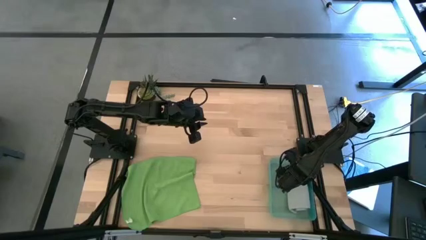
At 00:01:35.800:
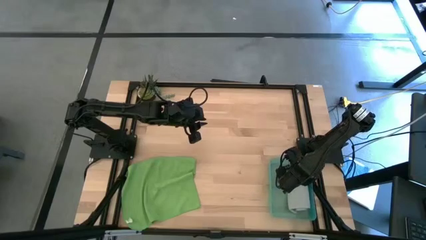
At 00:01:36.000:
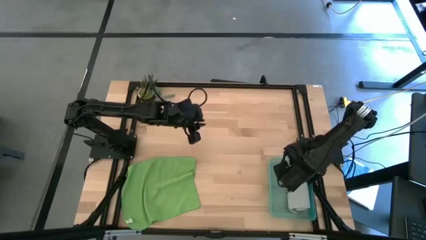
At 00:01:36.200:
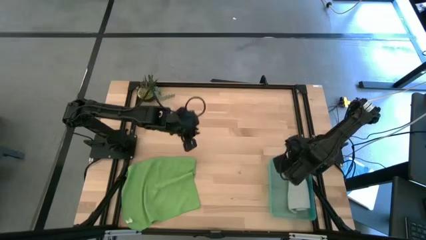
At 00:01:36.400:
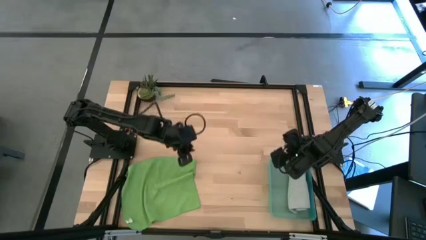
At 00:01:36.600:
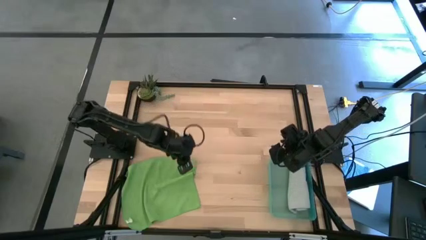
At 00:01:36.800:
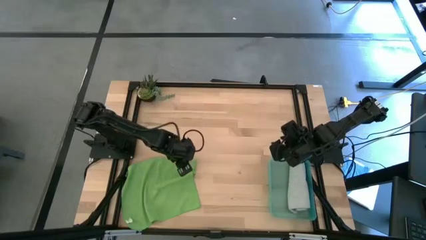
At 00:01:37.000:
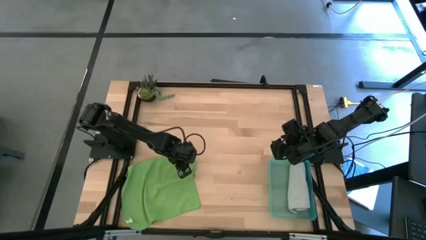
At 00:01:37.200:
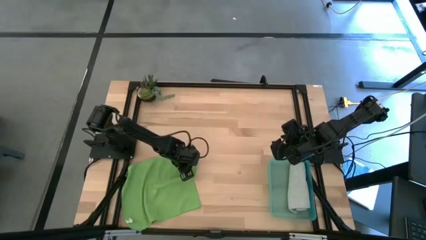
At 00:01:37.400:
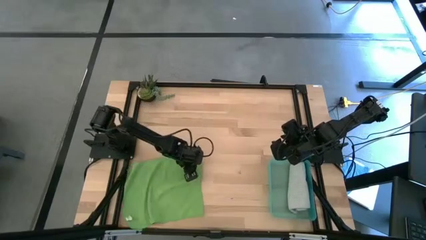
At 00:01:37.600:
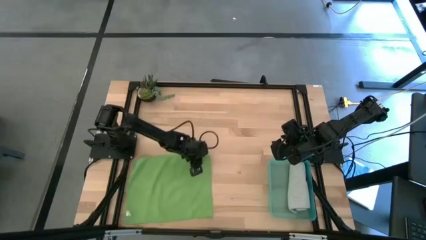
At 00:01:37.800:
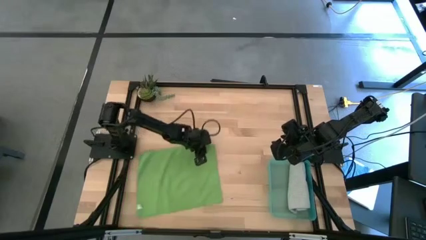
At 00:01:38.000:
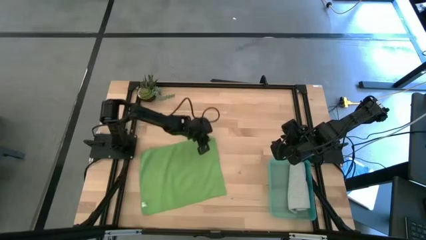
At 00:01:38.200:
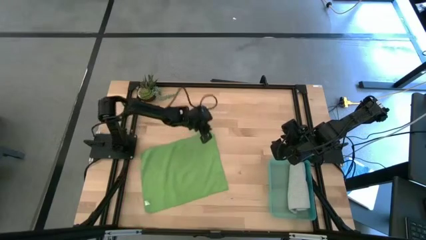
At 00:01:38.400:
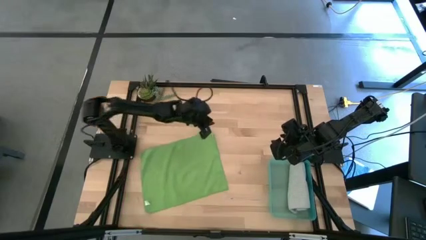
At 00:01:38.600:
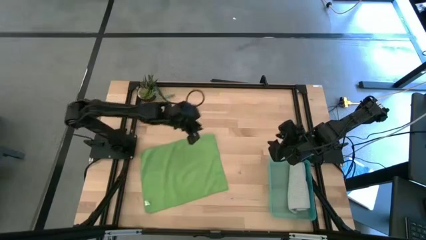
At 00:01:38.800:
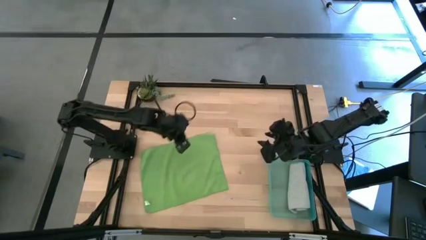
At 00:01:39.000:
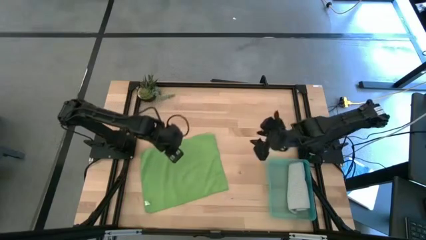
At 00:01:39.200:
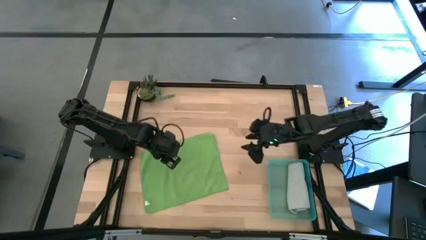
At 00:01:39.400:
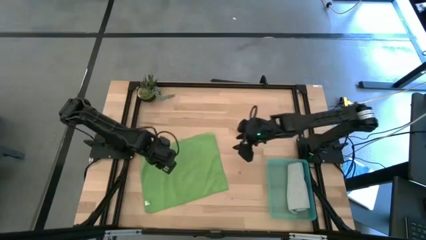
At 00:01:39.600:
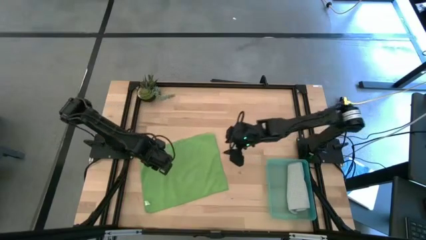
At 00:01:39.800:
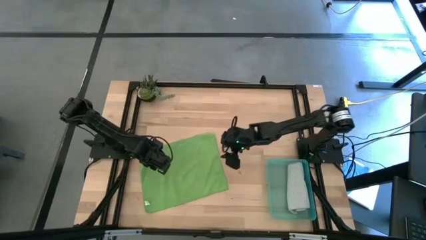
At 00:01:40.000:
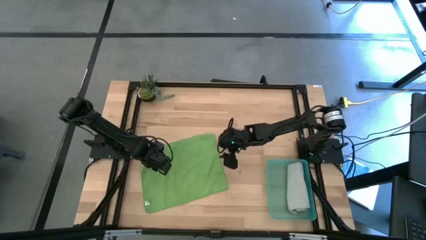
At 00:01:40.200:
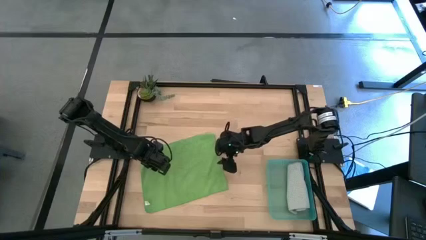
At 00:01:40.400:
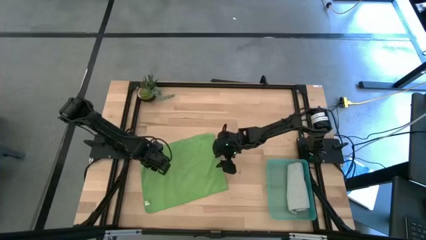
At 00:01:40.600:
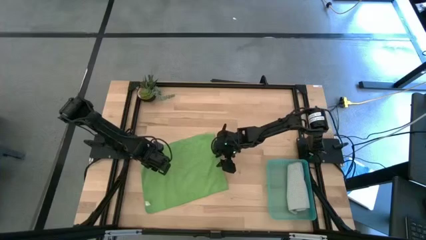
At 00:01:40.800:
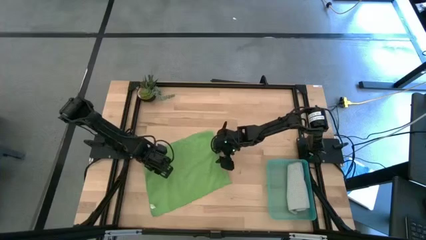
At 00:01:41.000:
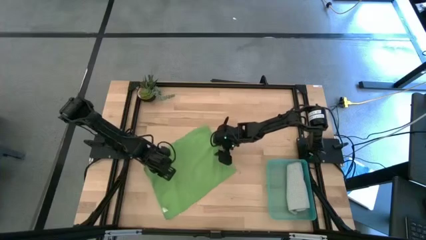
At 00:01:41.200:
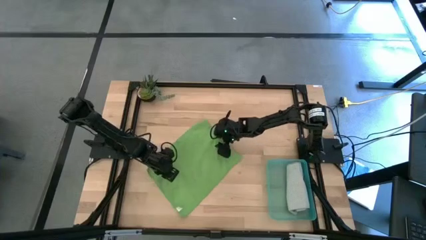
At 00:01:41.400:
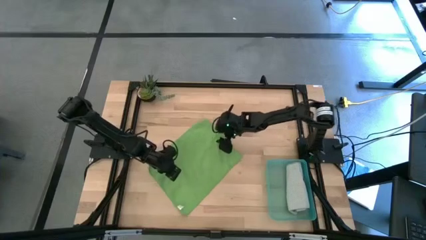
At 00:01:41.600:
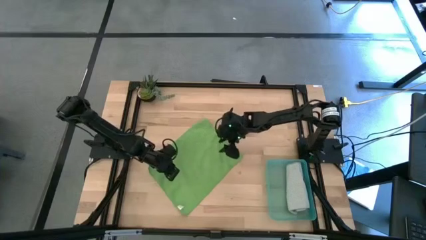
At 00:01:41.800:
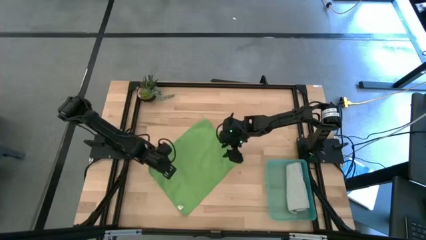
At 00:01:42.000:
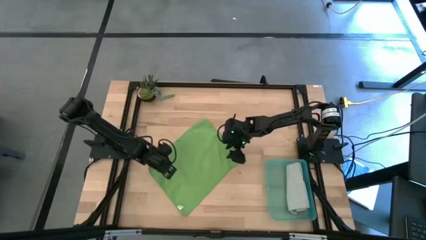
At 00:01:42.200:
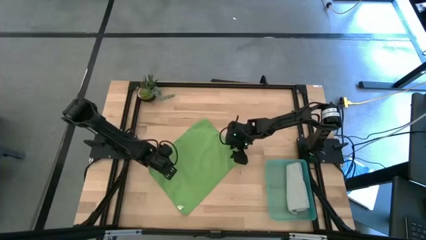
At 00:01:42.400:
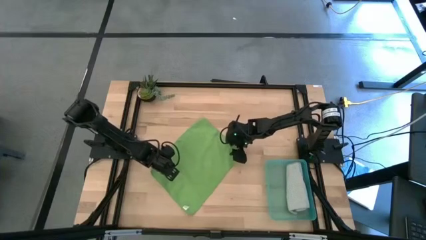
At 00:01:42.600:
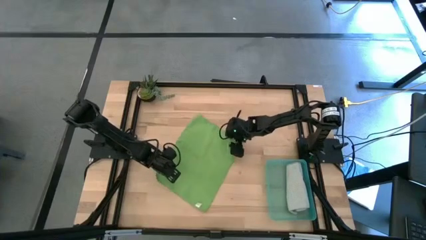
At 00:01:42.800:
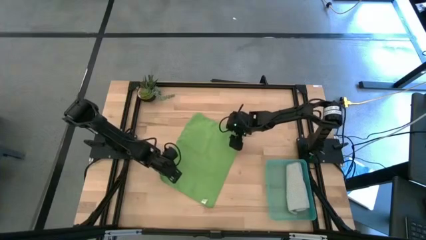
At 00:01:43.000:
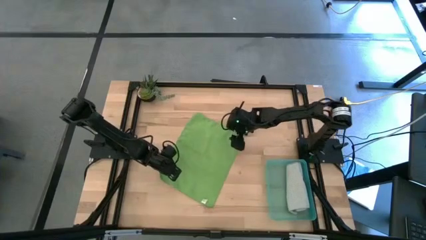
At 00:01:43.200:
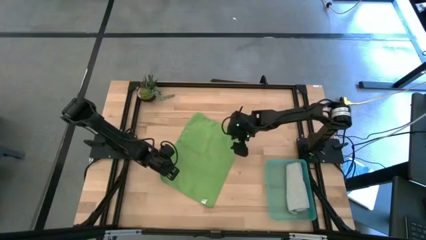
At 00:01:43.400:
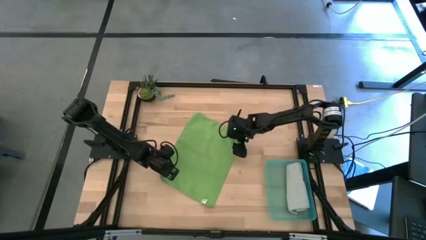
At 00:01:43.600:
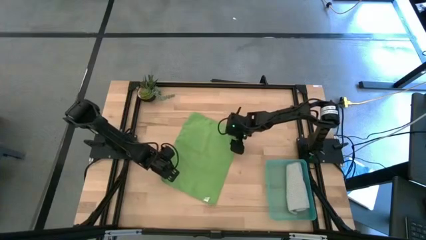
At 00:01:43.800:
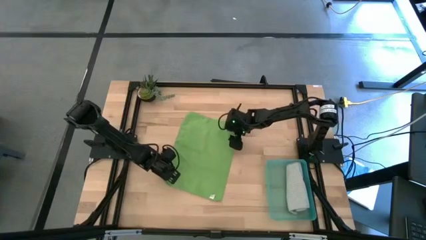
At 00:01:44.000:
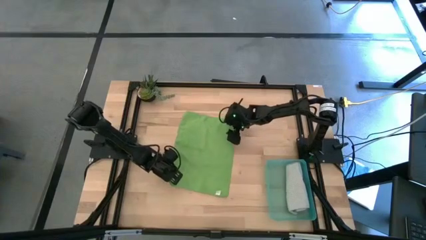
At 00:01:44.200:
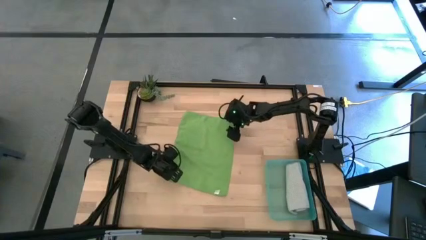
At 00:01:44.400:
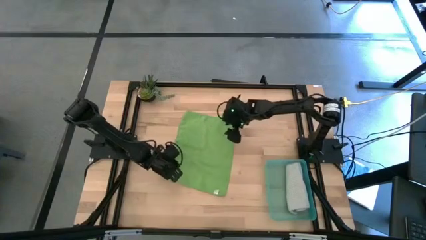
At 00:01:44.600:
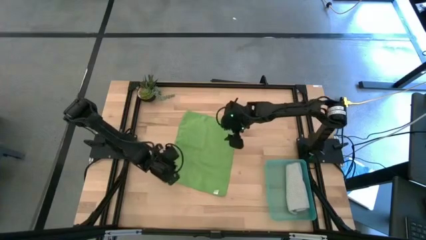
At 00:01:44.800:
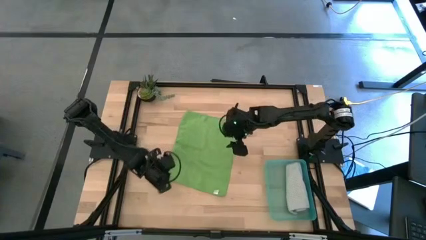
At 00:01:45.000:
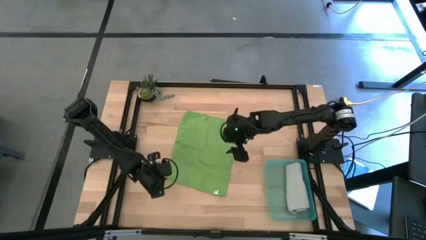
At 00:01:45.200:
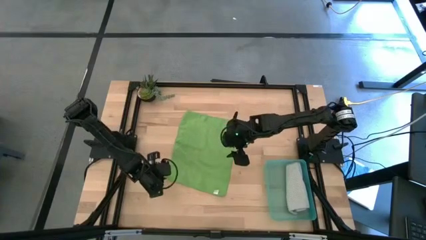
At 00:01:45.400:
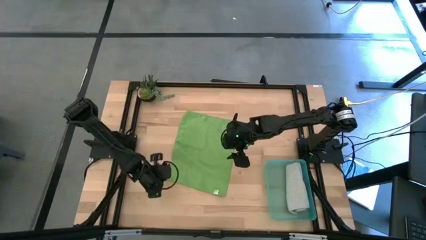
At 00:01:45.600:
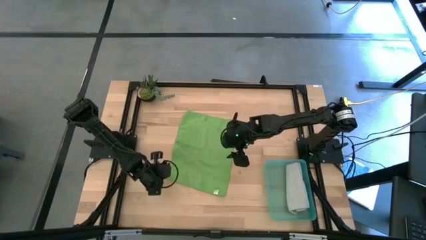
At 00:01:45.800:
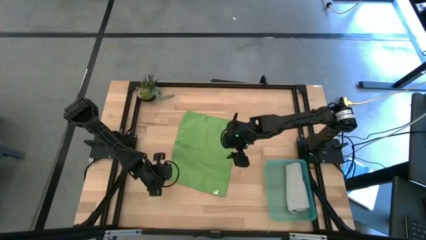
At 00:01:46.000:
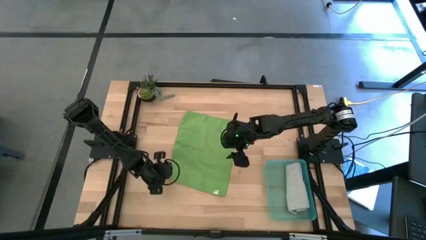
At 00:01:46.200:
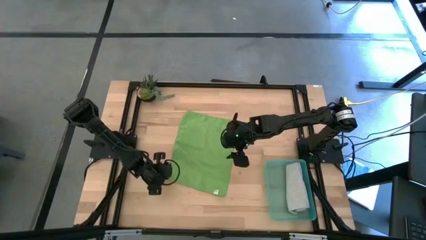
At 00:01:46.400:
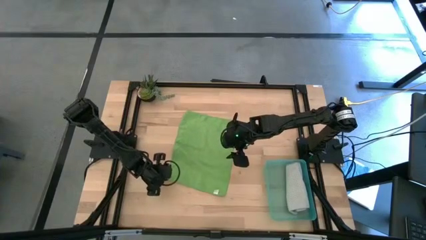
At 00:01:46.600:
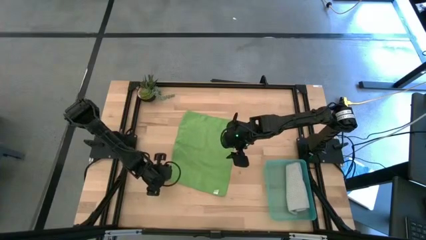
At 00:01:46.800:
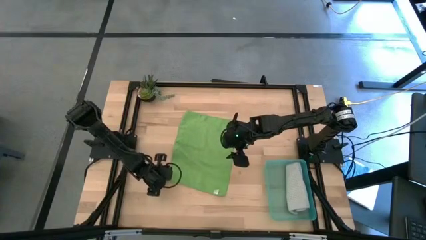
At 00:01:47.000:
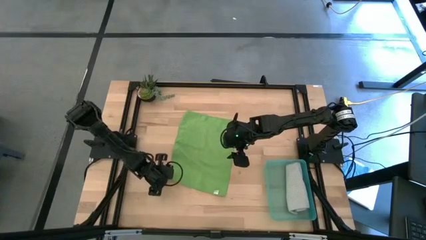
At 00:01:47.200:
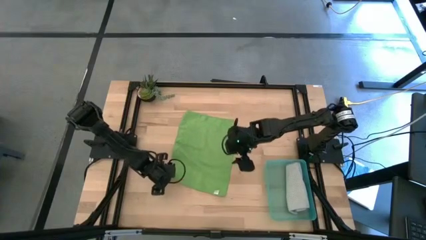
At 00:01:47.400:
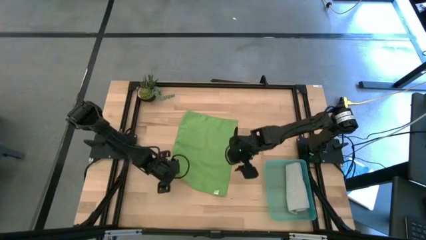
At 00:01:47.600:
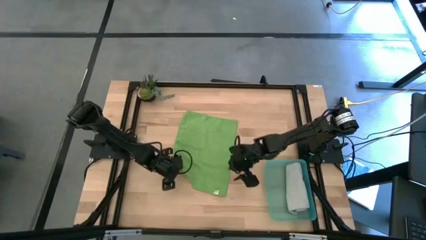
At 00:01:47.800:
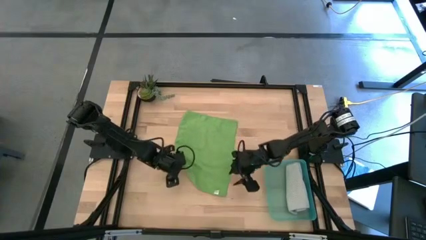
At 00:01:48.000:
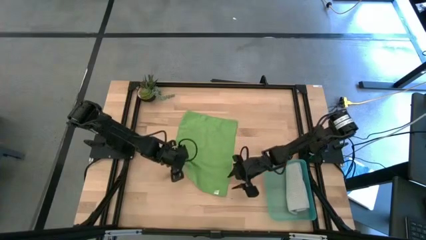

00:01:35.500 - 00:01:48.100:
Task: Roll microfiber towels into tight, uniform cylinder then place into a basket
Fold the green microfiber towel

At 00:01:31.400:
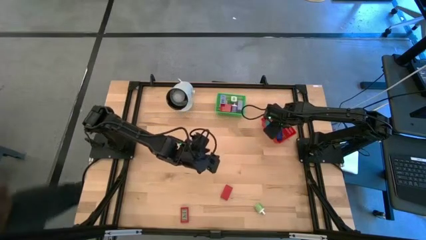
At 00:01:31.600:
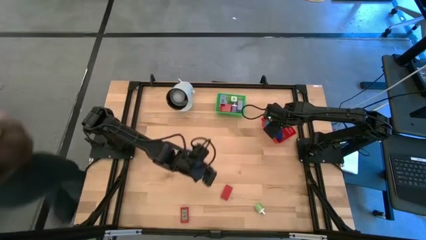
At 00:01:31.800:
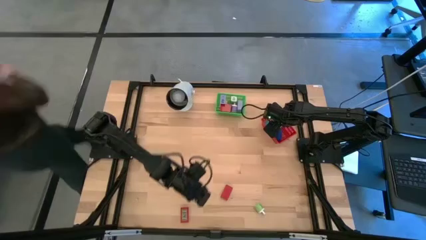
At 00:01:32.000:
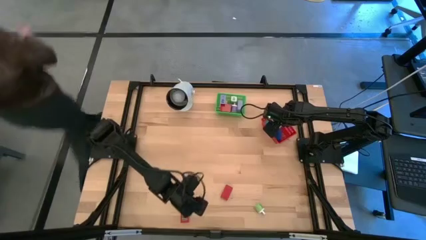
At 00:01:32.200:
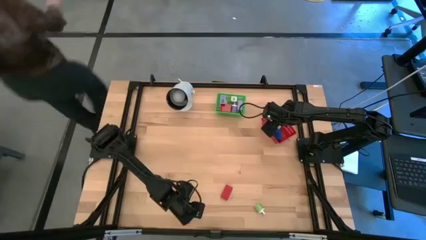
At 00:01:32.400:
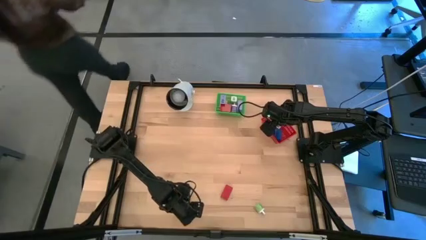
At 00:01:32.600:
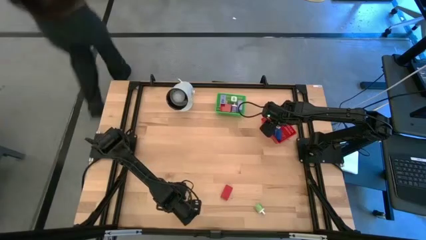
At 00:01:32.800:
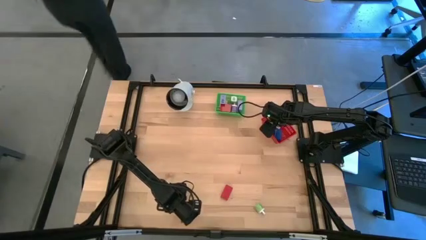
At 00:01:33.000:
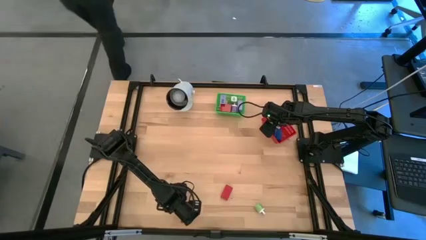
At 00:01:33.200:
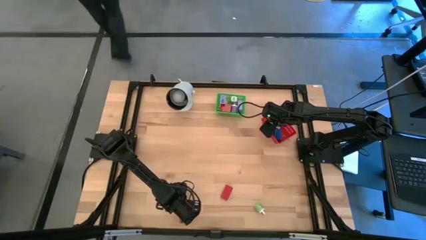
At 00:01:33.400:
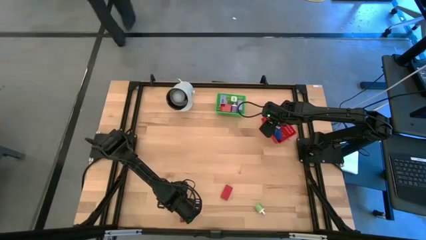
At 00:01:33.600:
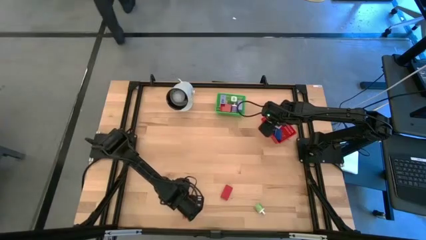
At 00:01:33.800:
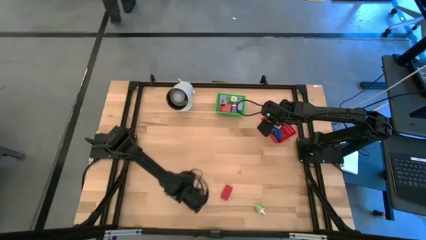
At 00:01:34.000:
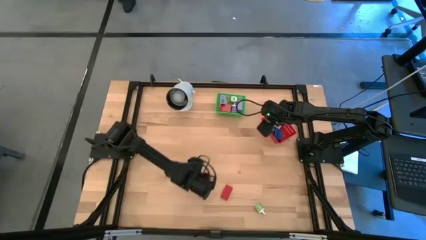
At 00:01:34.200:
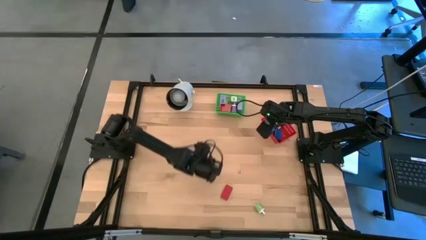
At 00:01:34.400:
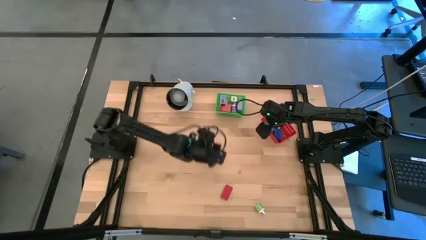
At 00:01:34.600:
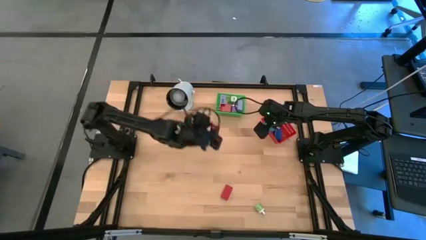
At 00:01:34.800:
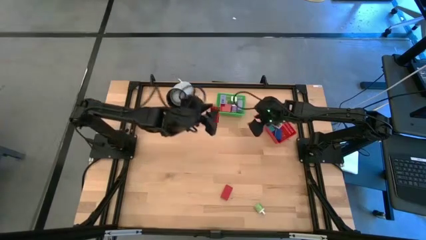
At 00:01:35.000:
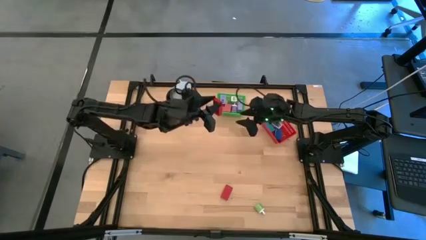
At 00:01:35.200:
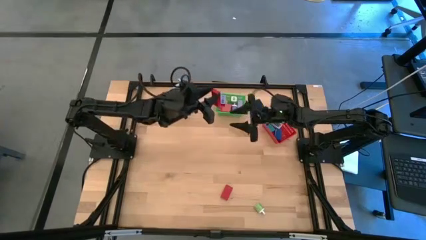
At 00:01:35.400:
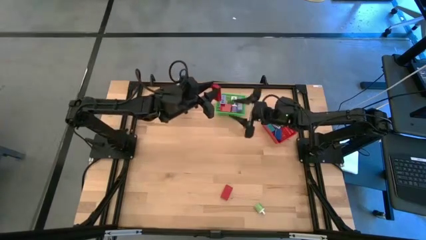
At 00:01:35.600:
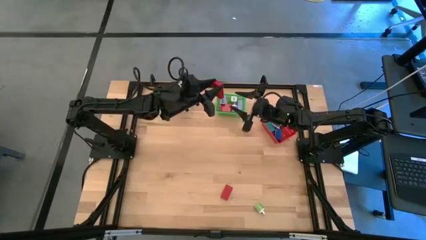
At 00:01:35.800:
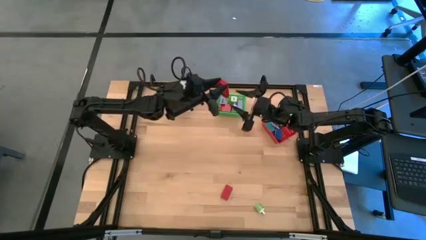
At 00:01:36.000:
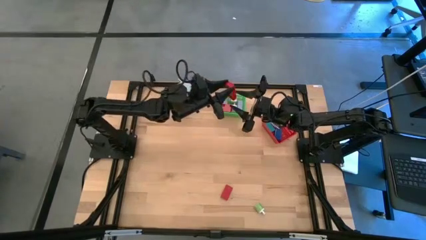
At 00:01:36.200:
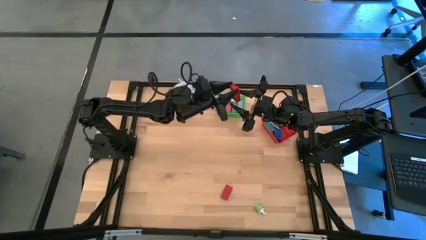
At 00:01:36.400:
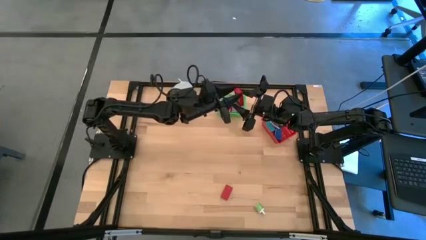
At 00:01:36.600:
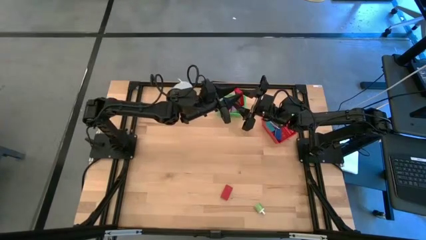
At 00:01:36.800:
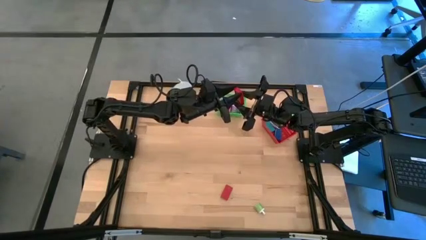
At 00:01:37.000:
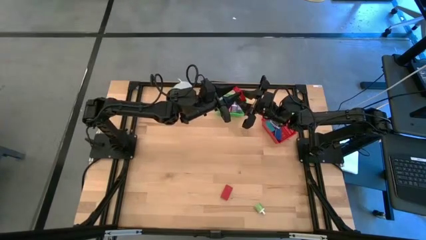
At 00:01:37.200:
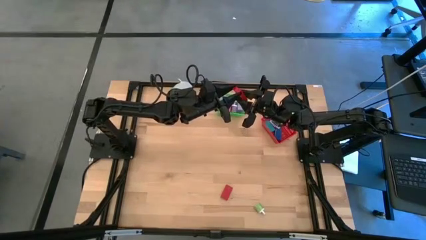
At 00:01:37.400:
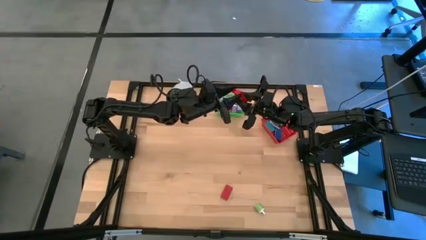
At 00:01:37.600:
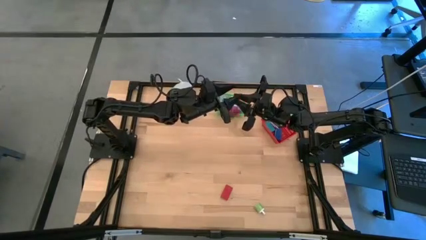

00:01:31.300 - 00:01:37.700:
Task: Pick & Place Office items
Put the bottom red digital timer into the red bin
